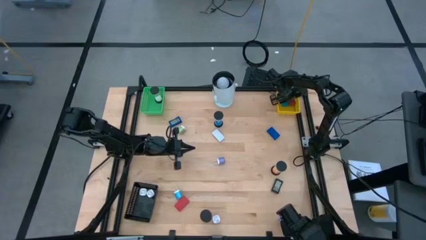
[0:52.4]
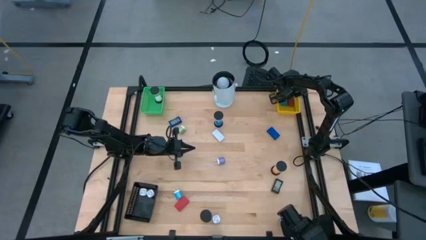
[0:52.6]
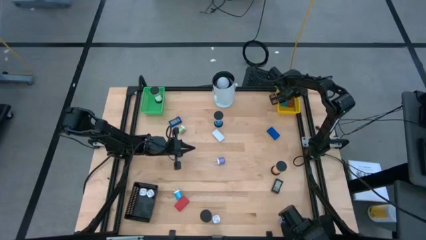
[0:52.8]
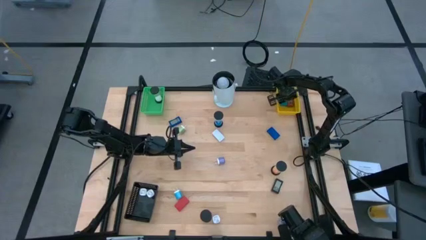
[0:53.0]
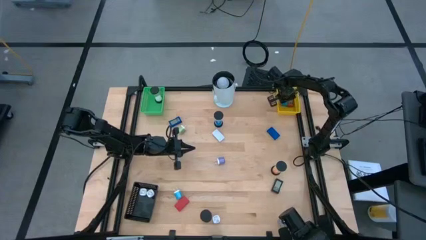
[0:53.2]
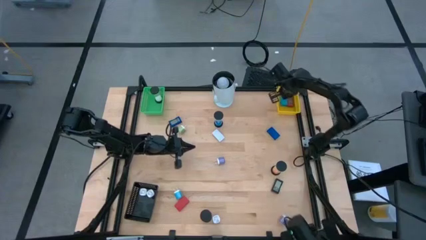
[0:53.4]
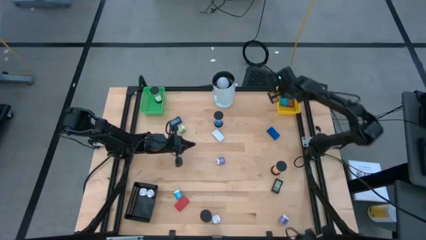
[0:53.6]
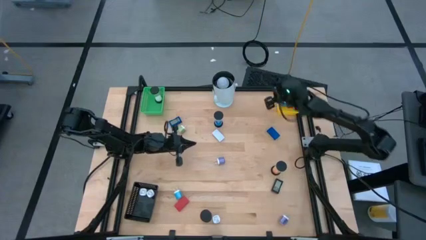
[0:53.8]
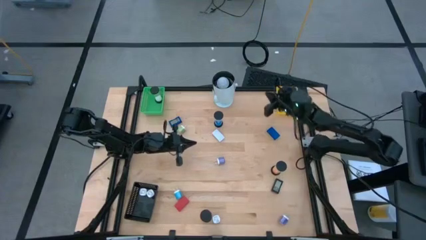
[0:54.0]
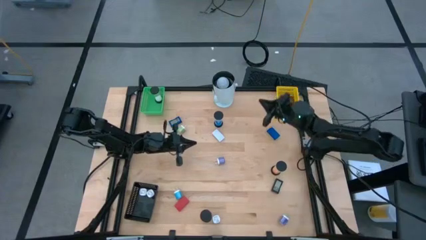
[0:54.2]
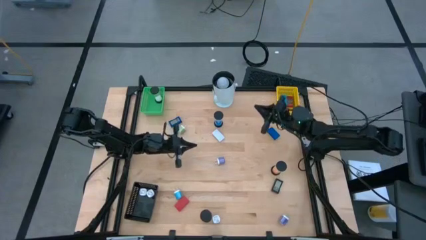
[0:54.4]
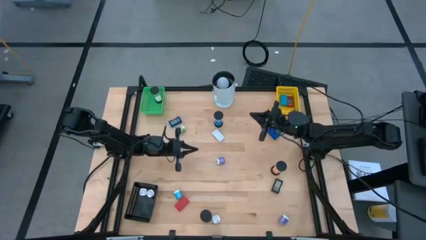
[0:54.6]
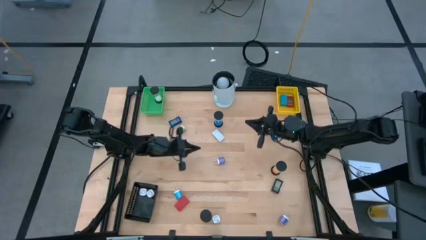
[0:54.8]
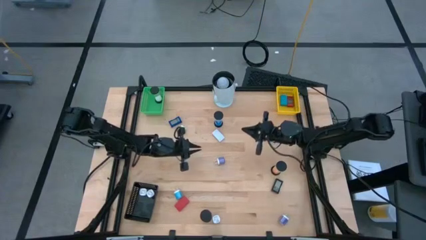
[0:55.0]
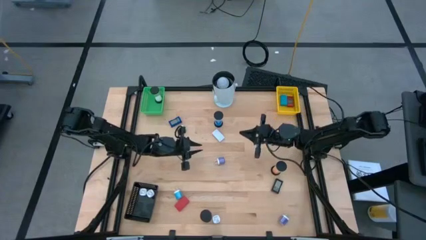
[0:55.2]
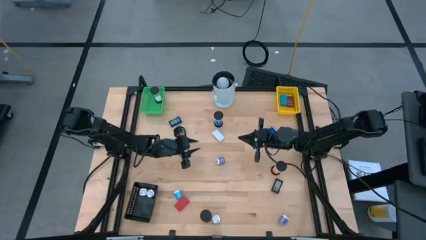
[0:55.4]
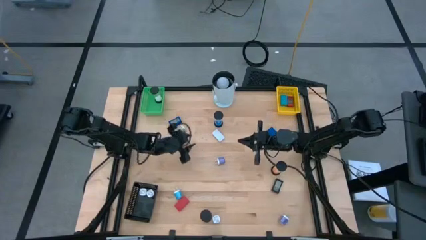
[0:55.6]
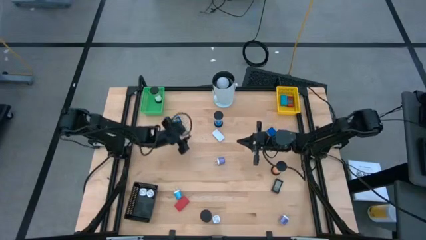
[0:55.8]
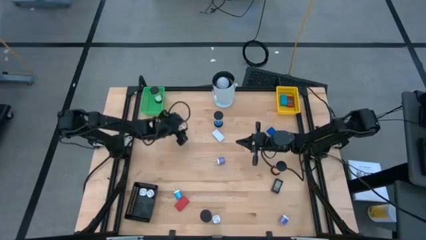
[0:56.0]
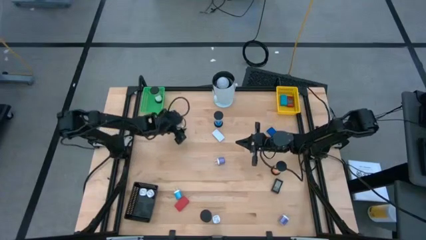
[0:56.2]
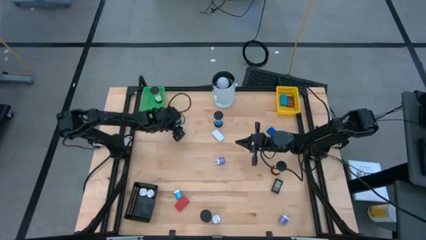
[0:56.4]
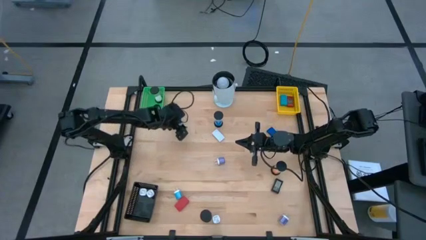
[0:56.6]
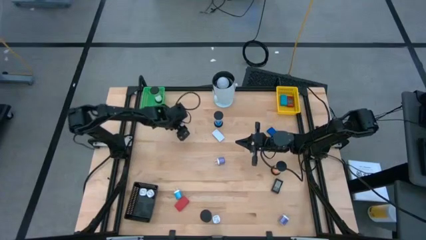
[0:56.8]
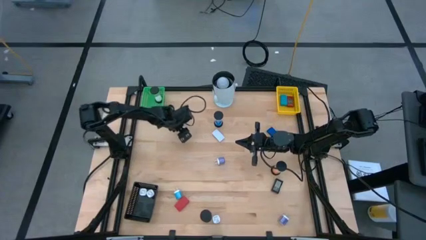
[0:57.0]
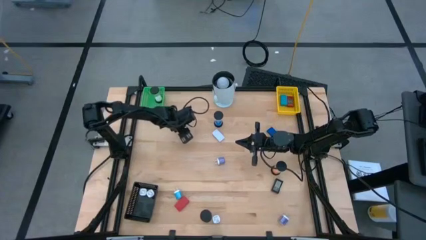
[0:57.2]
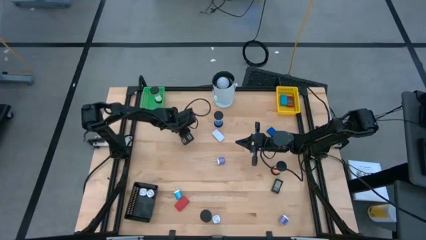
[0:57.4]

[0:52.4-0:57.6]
Task: Pick & Place Office items
Put the green charger adaptor into the black bin

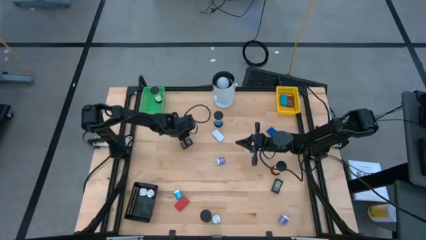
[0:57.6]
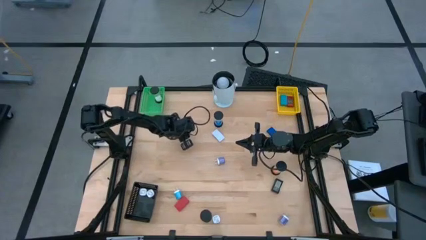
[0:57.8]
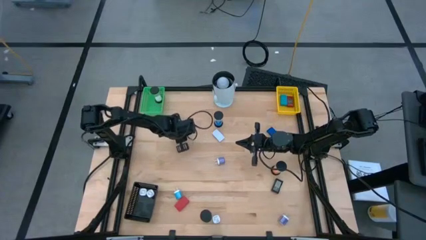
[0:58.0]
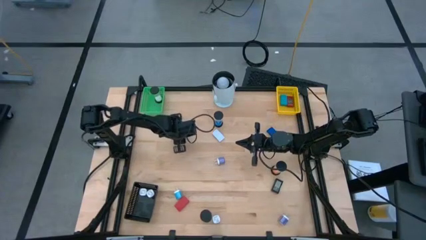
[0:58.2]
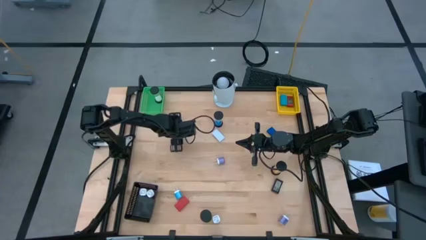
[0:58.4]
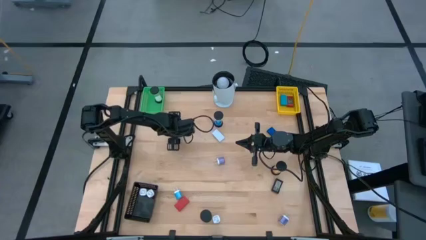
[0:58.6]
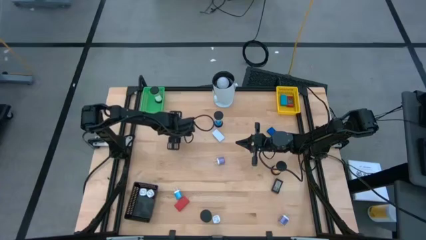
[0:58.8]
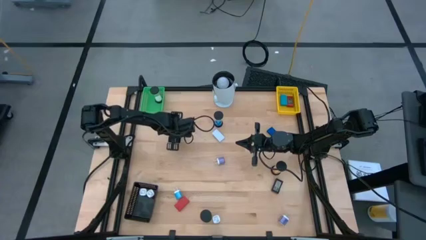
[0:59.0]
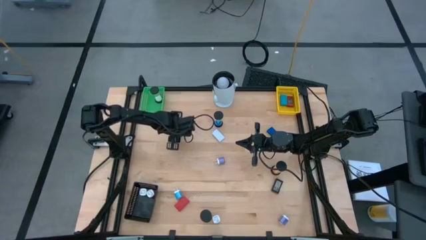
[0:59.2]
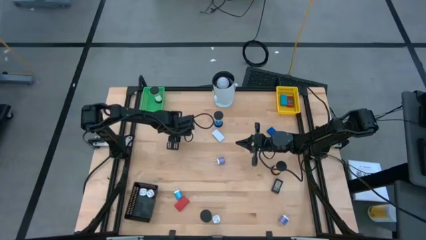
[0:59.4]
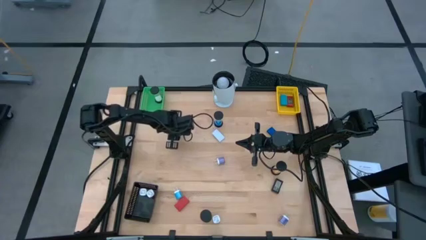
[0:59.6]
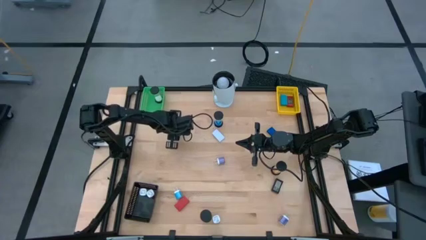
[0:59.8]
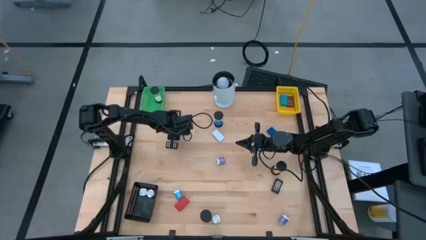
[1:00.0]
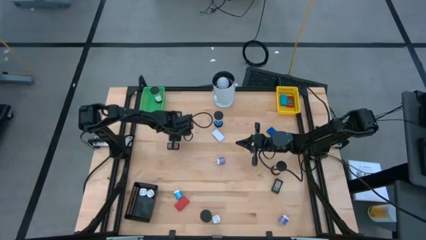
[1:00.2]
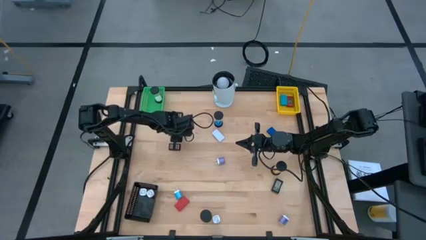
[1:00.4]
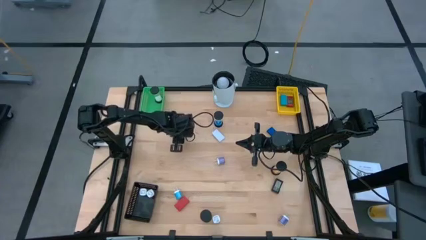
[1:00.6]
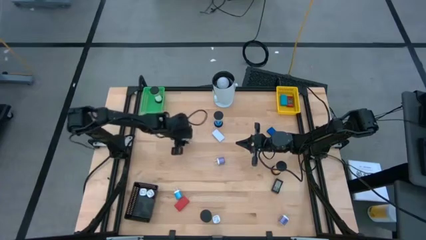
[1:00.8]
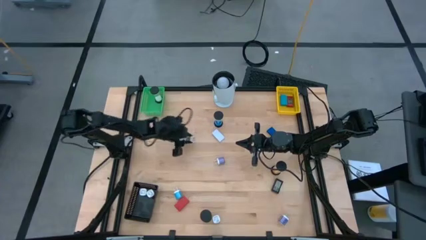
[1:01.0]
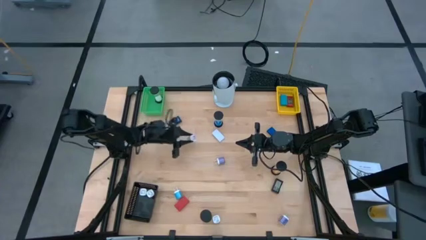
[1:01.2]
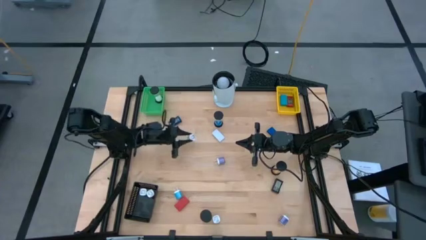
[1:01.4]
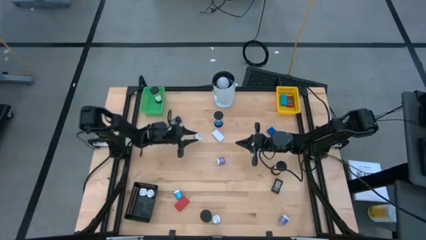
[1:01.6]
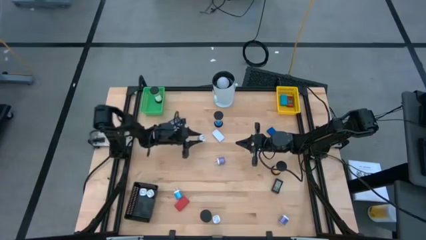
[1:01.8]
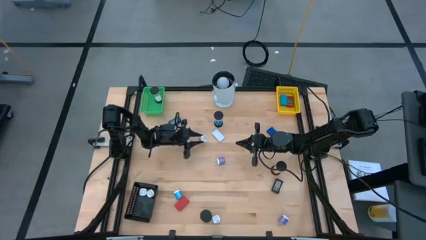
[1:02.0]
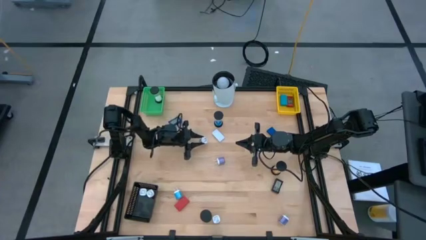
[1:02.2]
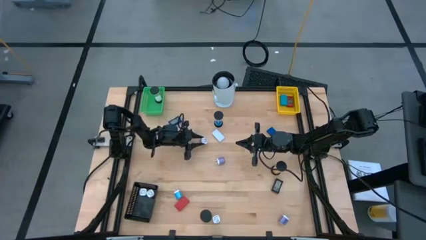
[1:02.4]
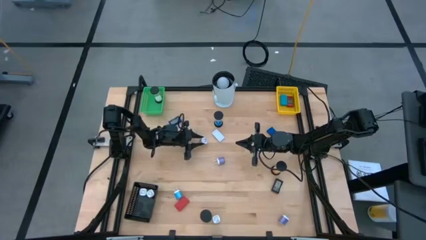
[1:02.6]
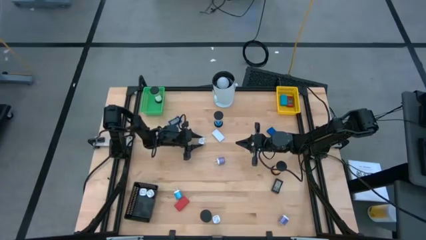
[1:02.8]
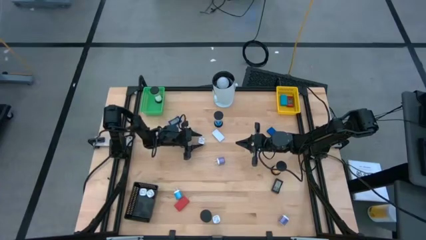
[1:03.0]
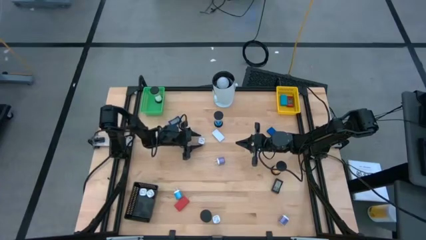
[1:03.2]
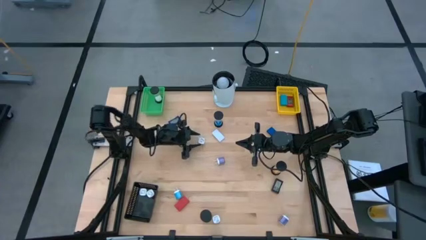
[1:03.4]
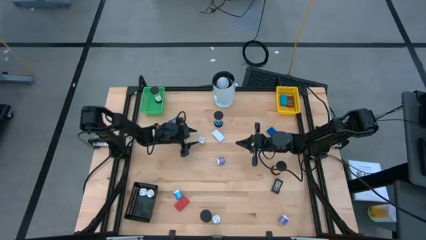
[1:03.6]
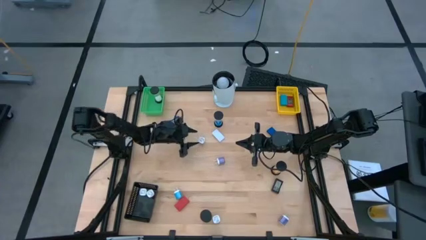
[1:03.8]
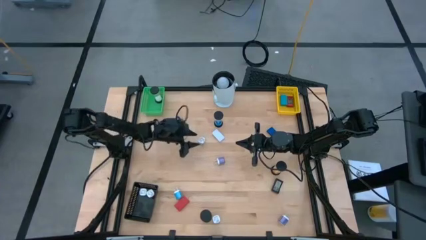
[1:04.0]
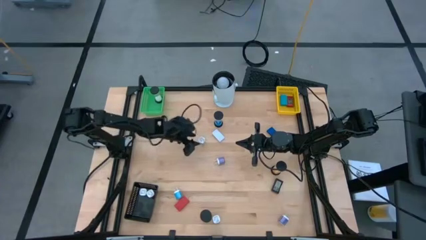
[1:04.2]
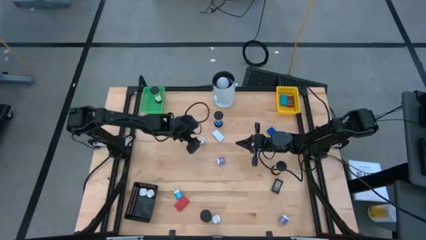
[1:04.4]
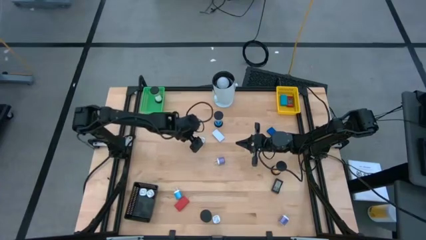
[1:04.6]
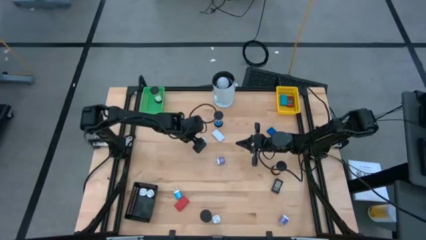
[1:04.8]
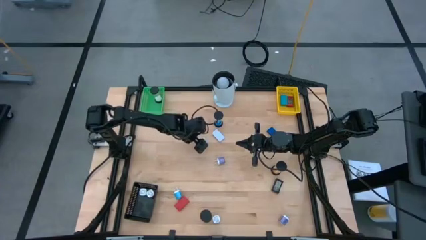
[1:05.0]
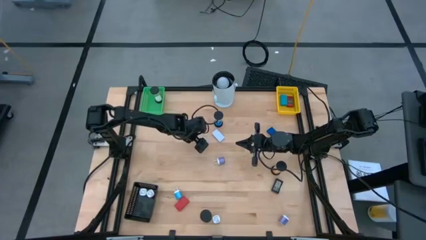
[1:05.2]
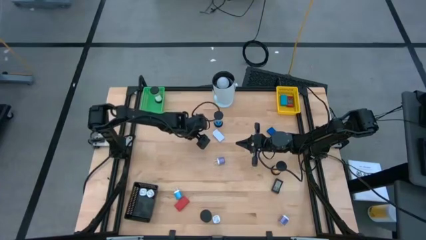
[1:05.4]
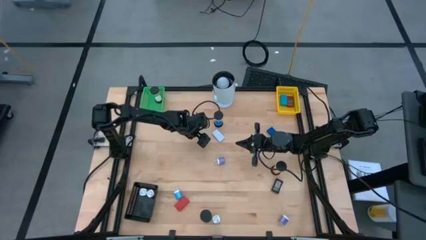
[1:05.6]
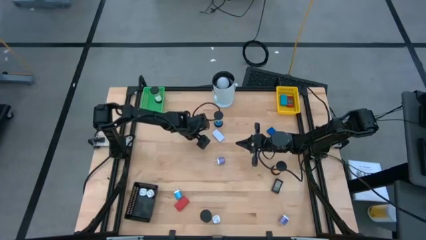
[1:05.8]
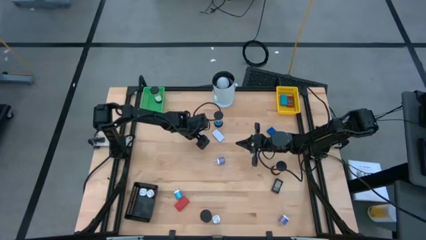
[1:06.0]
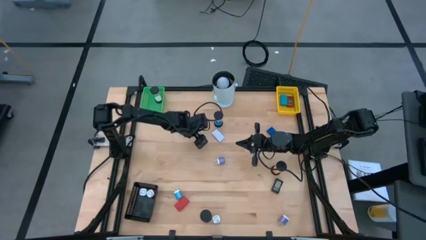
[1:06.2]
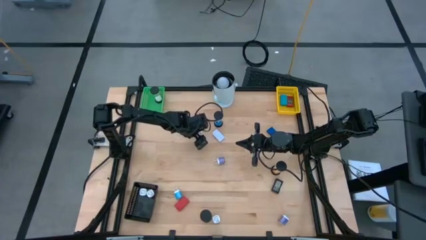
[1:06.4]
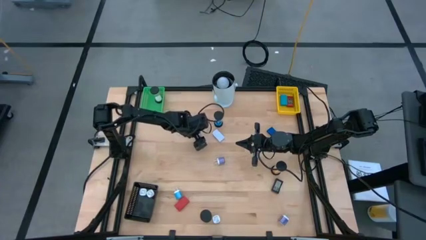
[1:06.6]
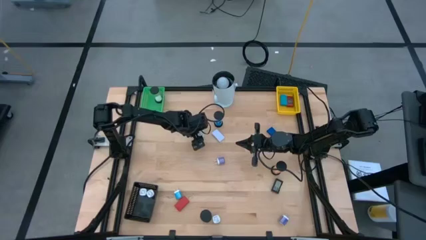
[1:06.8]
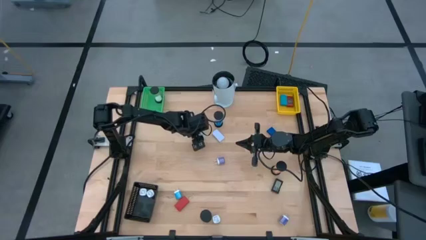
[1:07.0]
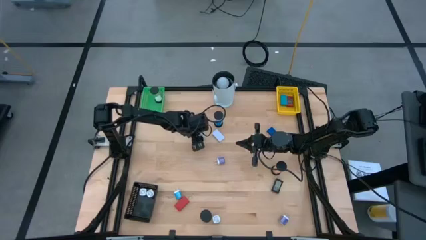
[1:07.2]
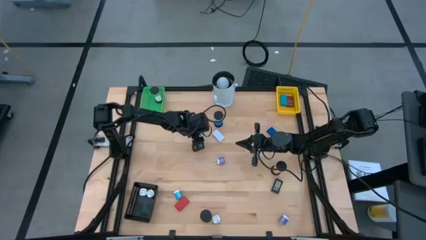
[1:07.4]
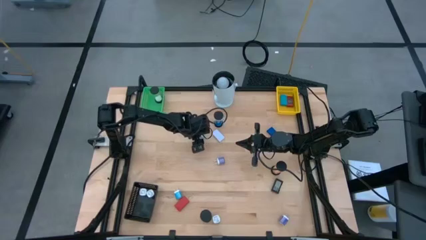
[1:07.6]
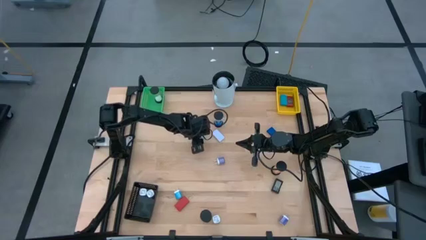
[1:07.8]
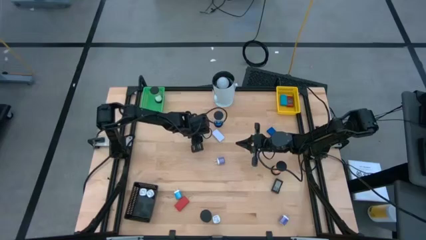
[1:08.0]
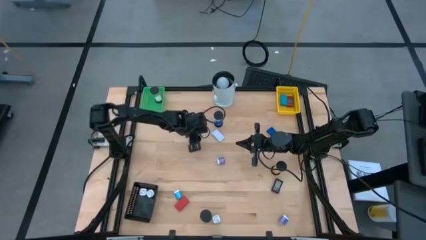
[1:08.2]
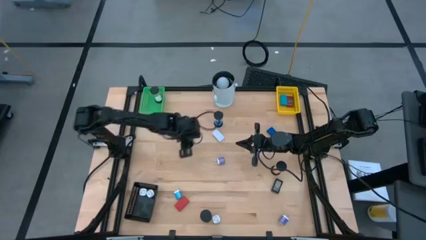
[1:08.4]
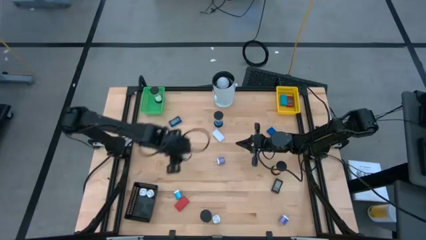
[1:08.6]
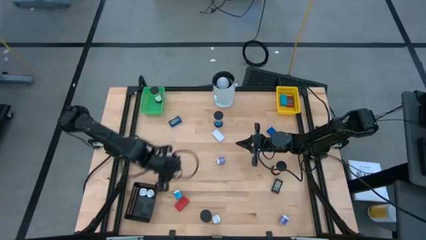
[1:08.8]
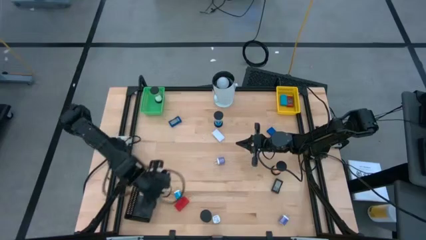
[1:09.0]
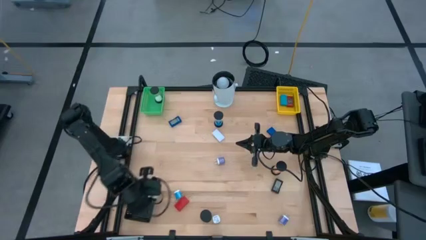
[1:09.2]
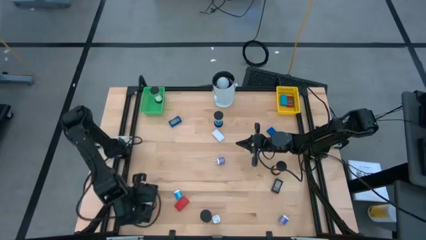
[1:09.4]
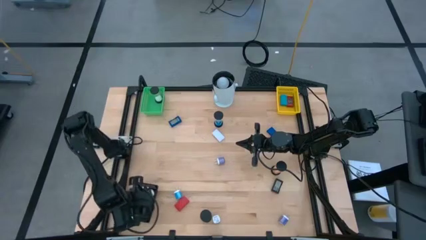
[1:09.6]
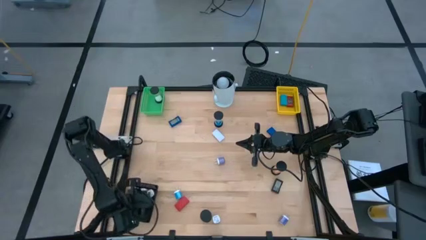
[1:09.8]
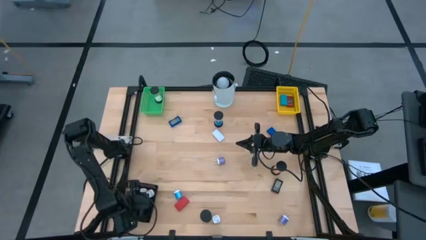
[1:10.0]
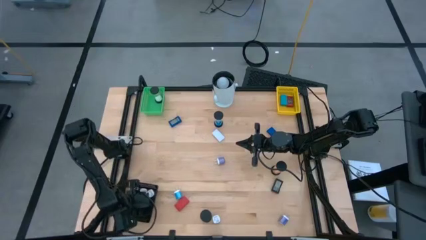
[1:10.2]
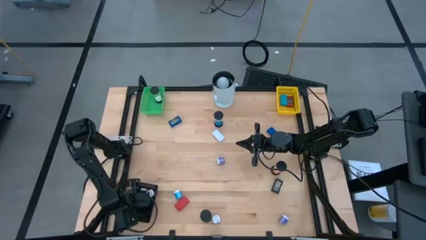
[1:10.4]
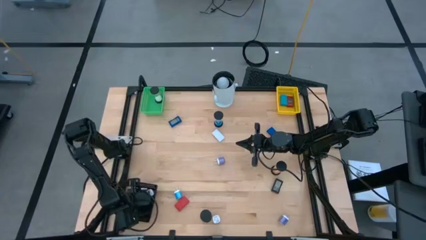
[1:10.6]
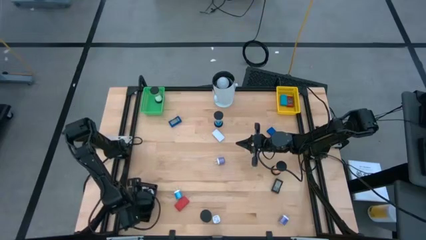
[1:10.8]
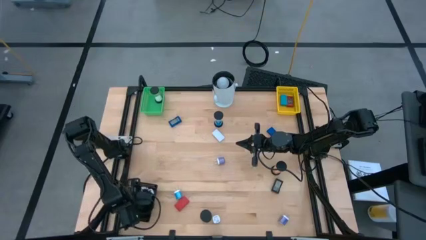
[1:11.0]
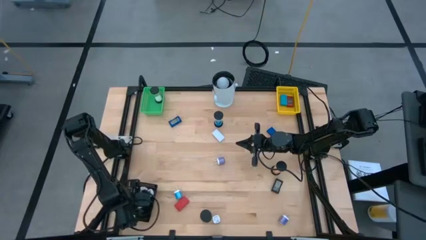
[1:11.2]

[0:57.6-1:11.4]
Put the green charger adapter into the black bin
